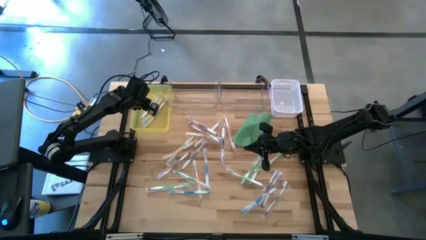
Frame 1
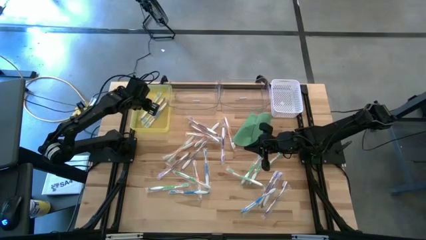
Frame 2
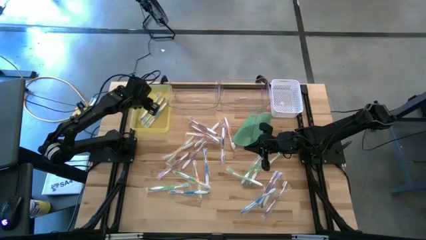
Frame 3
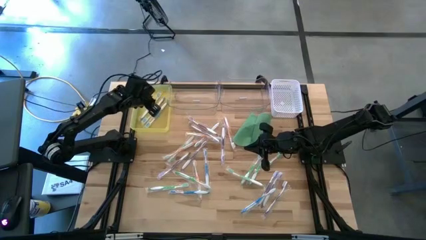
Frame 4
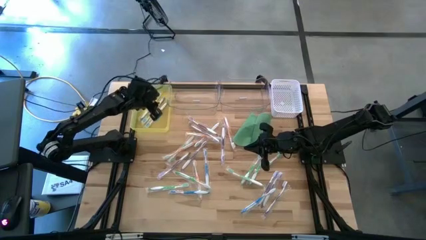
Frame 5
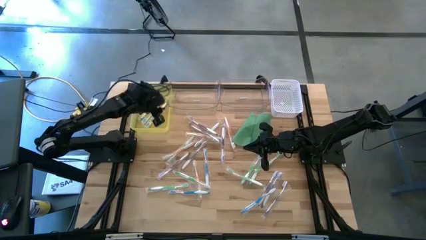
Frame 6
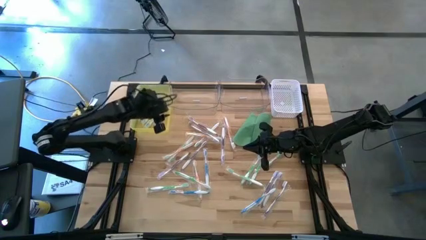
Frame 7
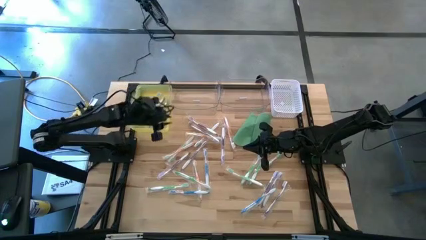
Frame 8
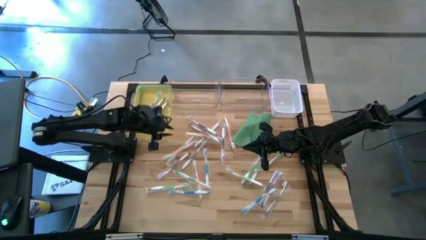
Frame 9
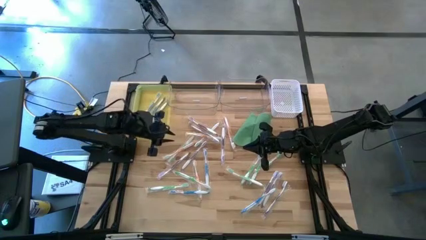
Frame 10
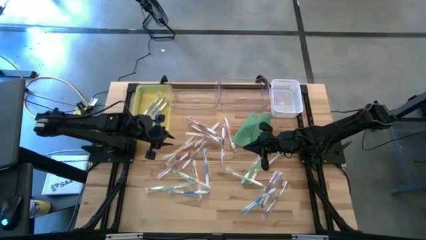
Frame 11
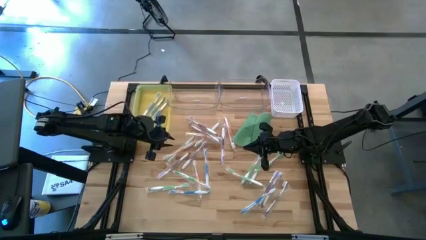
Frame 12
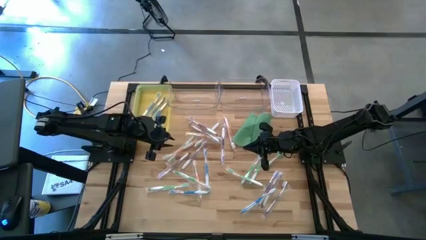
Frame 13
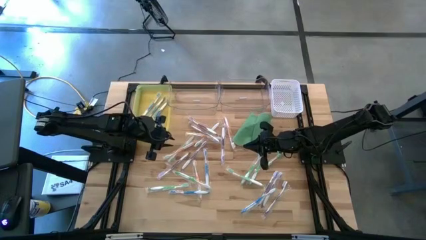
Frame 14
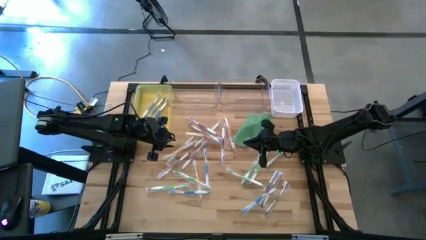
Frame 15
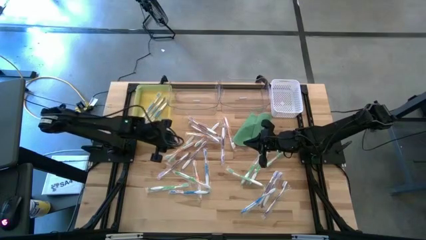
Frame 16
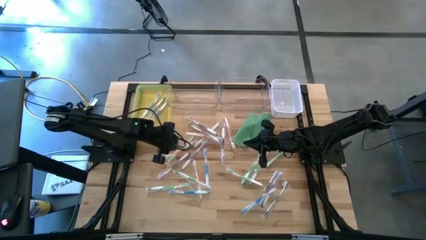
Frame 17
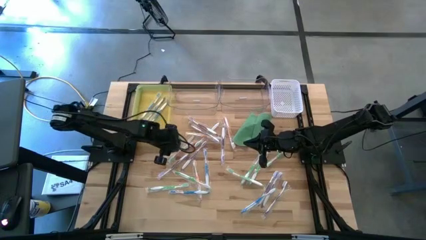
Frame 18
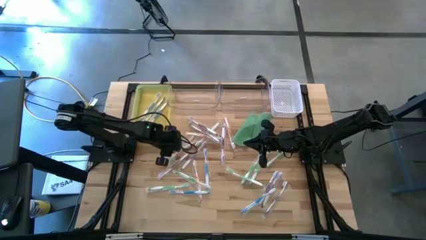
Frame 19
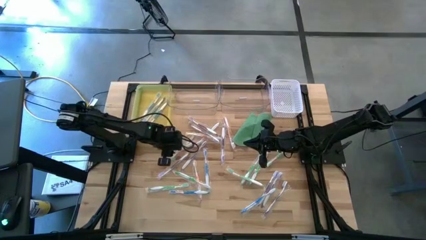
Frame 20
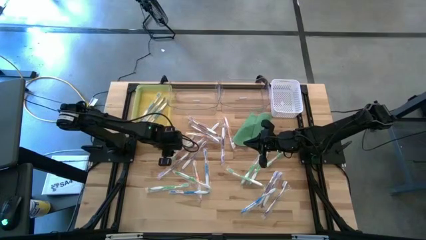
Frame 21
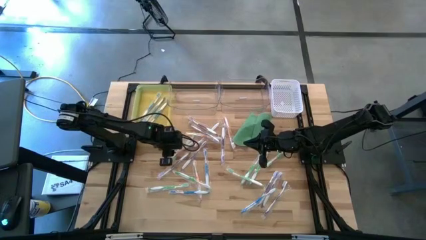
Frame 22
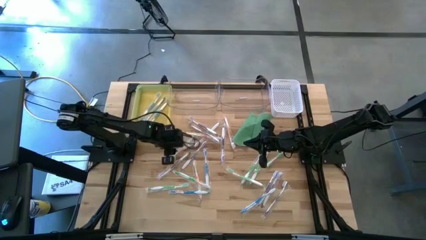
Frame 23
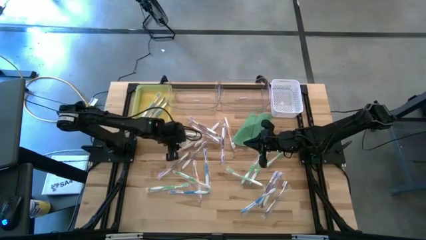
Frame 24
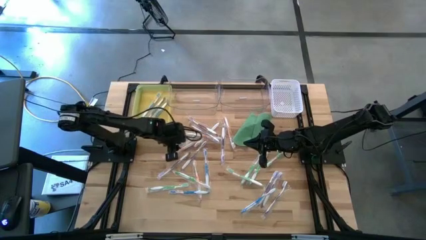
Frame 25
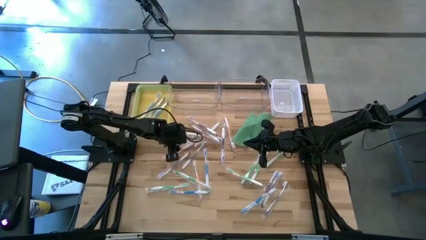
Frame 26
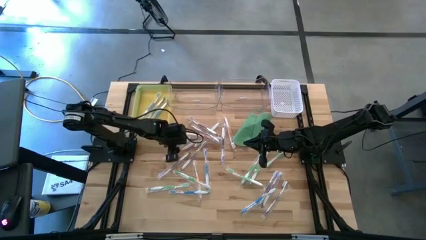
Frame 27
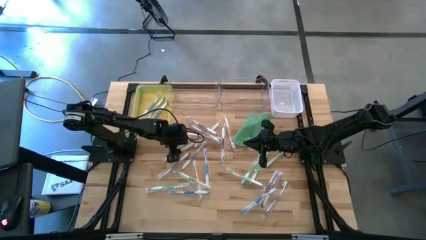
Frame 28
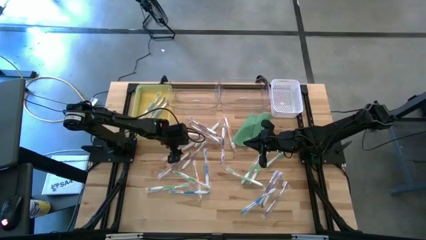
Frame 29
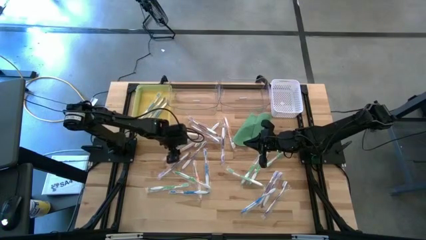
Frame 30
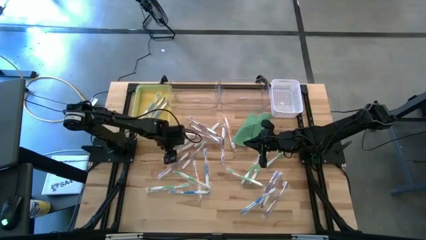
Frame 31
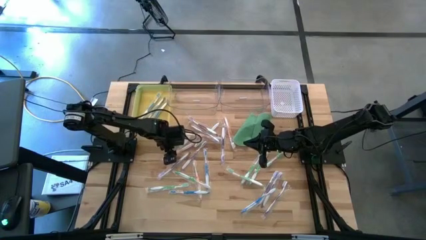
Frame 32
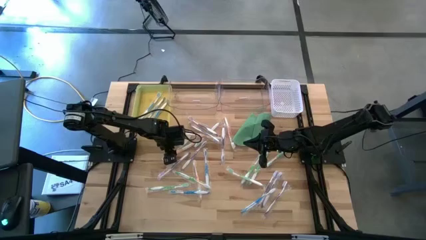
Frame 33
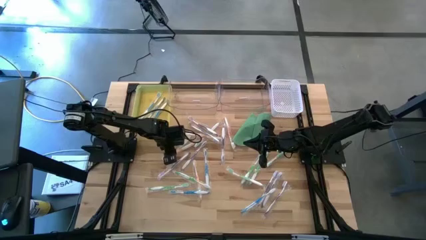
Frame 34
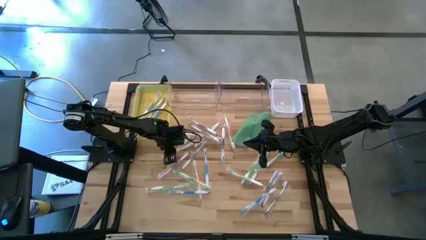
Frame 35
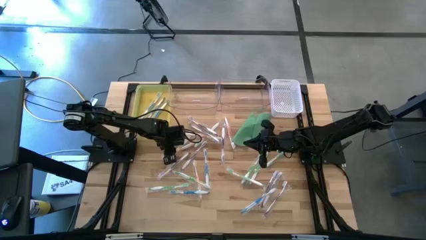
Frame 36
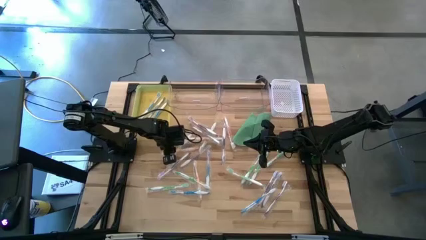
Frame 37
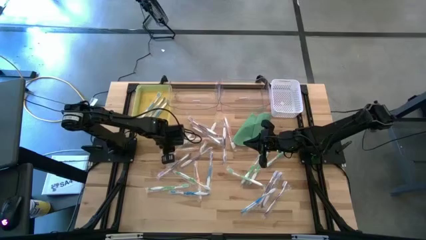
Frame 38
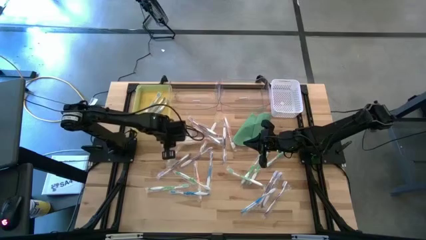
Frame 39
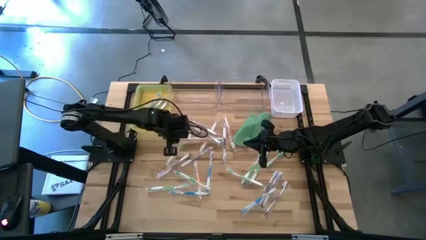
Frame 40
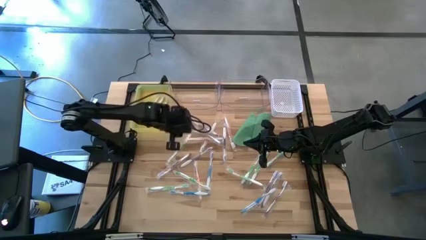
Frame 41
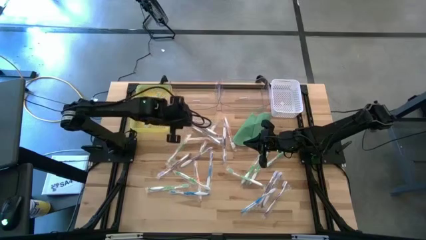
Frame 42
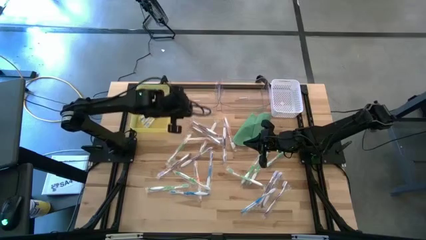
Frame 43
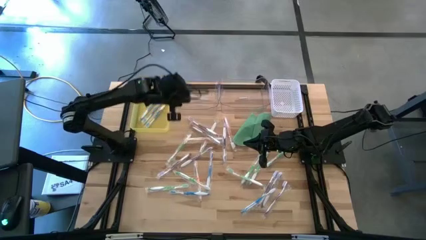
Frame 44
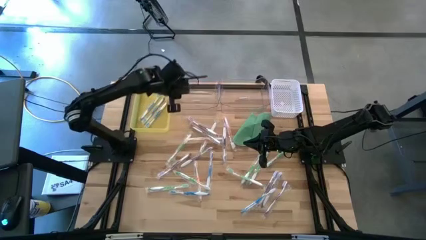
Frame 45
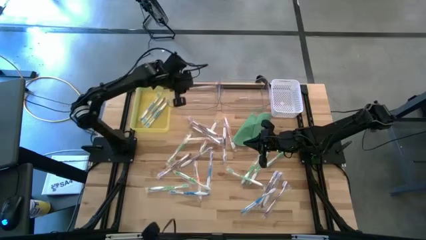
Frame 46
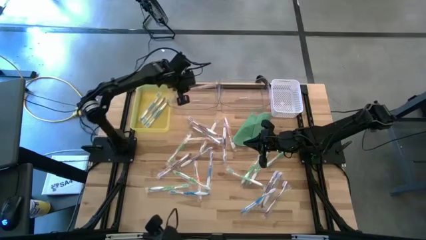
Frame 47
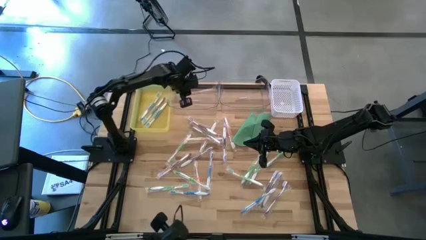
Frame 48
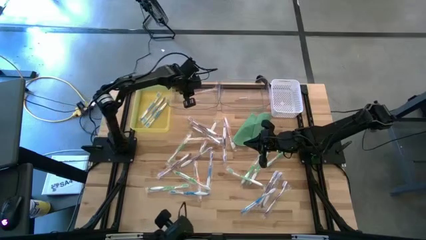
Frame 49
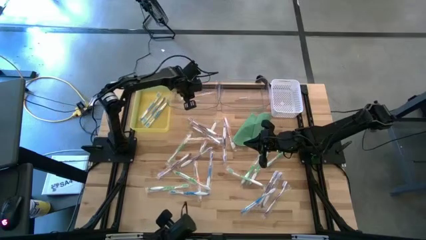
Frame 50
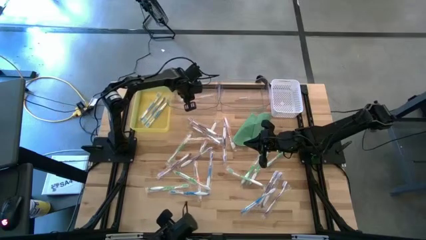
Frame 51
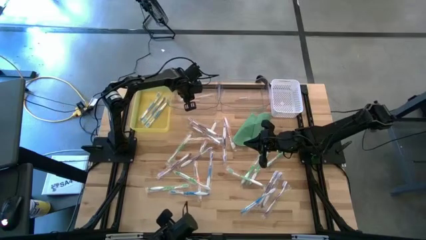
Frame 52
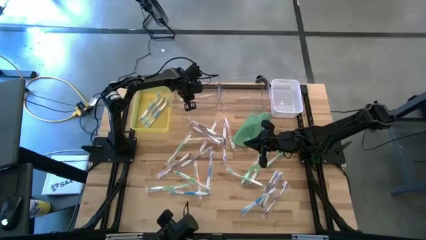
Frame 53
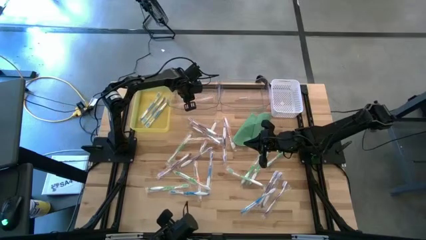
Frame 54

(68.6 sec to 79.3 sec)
Task: Pick & Place Toothbrushes
Put the orange toothbrush into the left transparent bin
